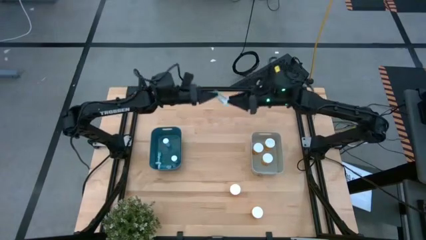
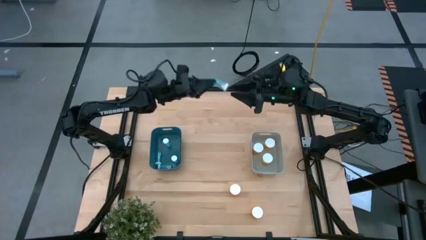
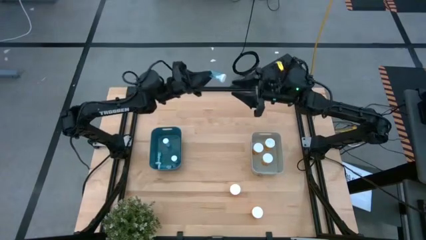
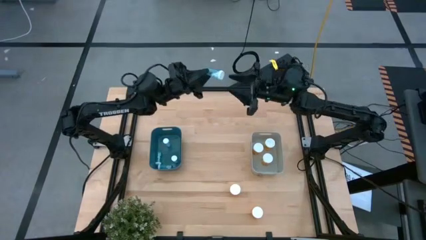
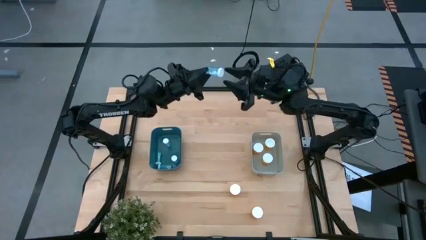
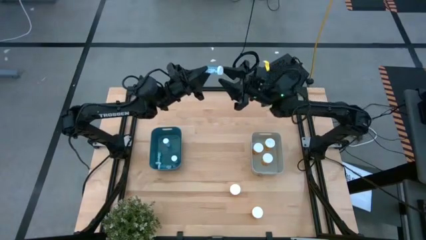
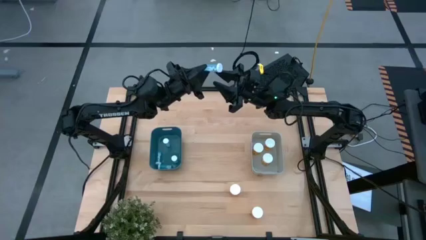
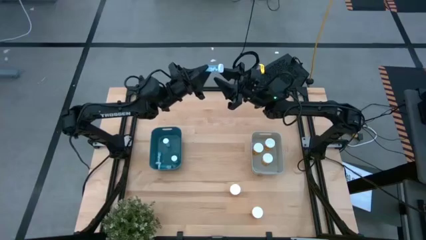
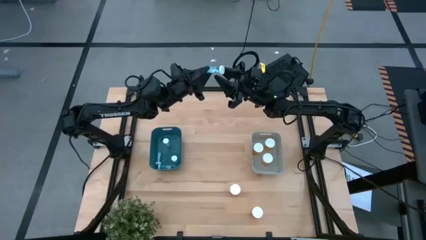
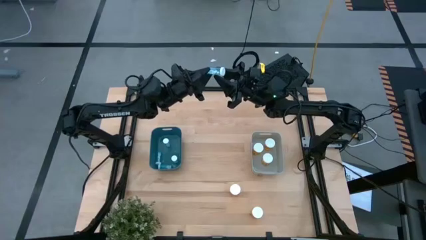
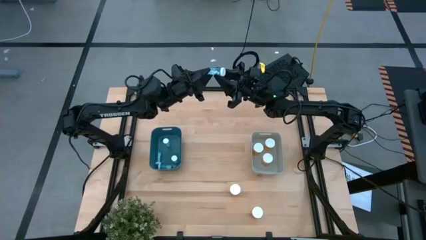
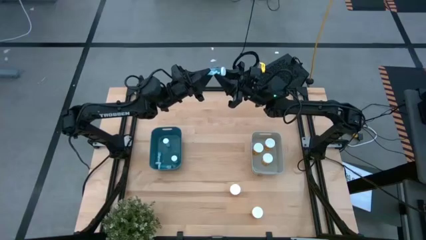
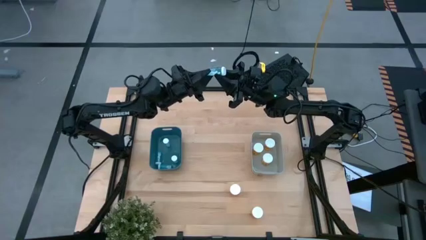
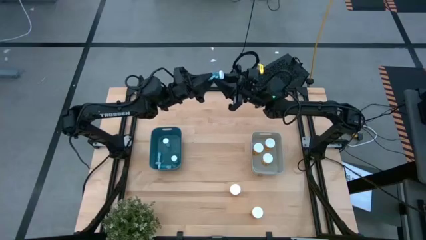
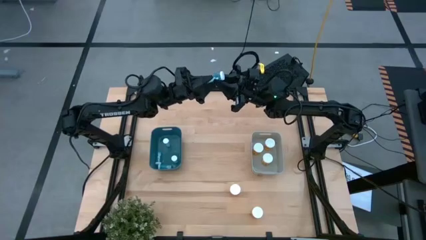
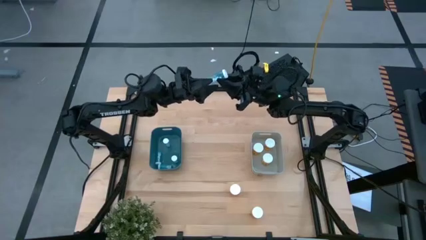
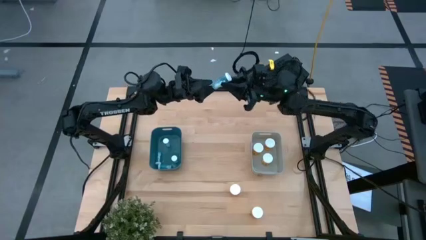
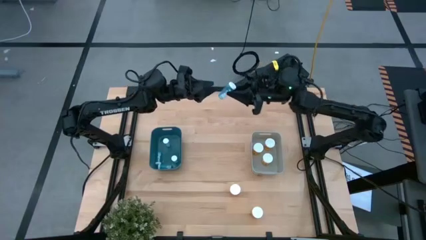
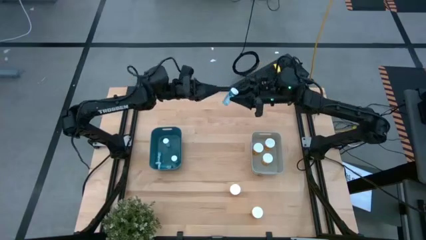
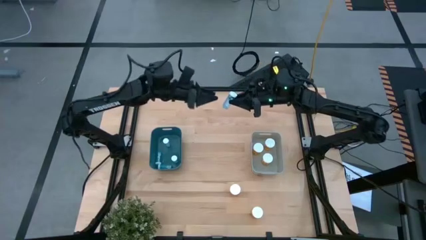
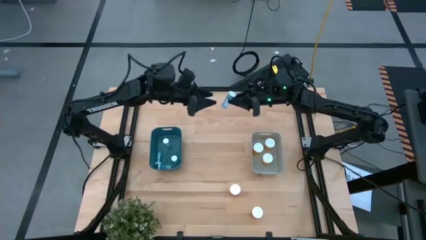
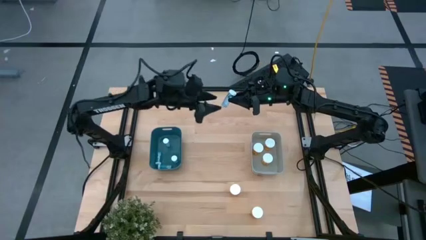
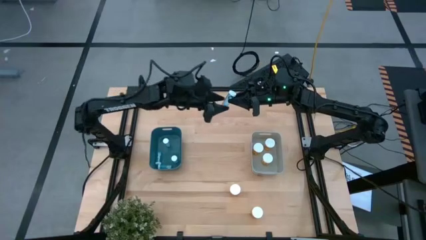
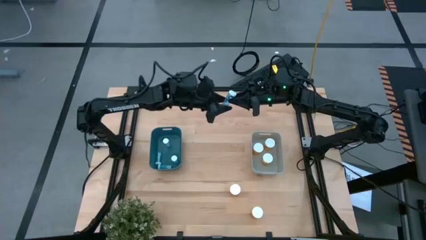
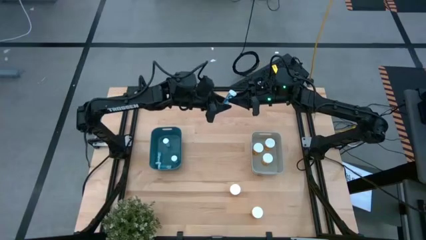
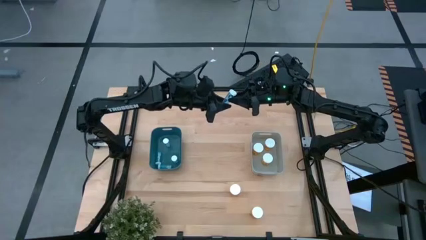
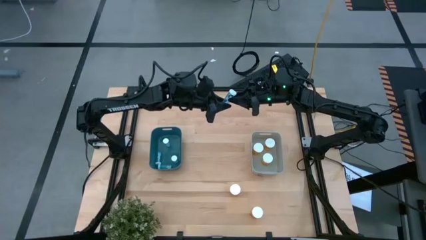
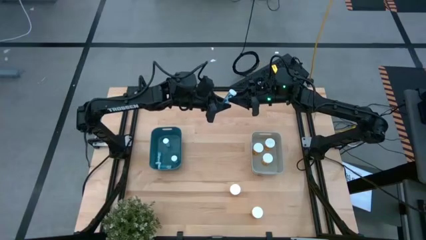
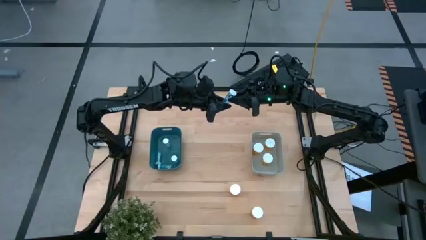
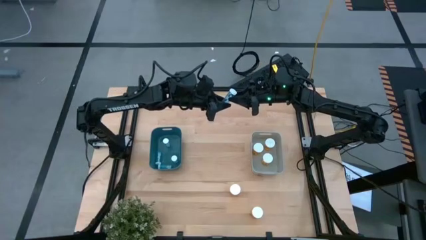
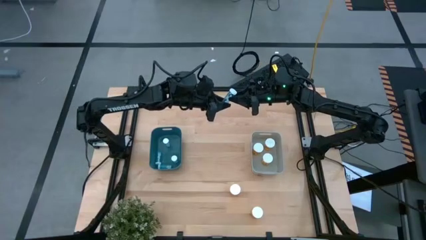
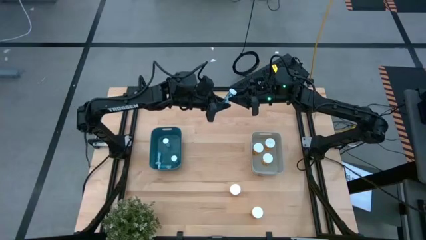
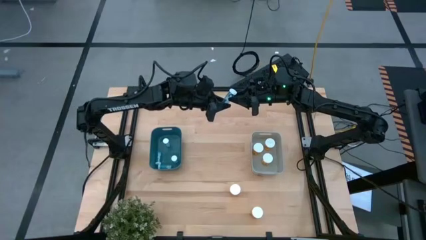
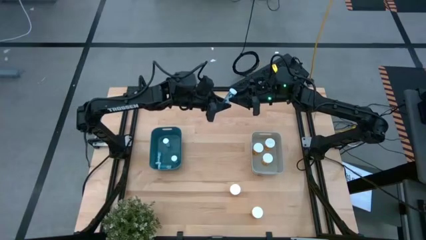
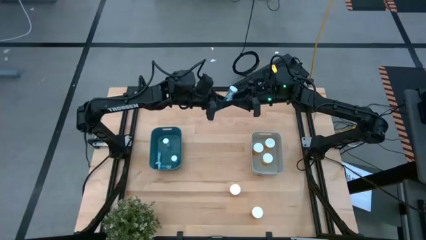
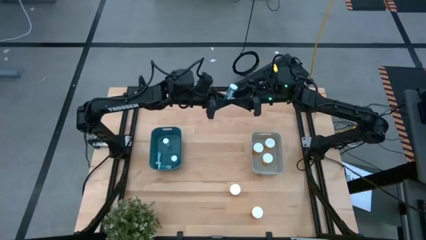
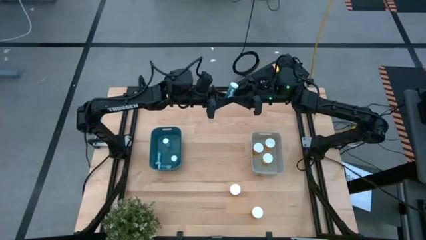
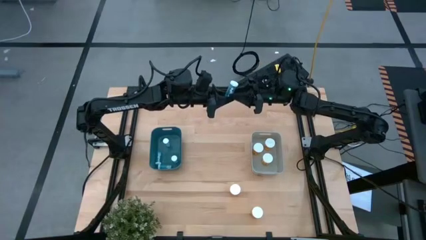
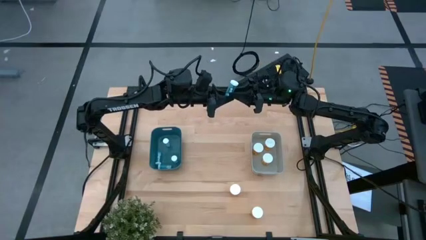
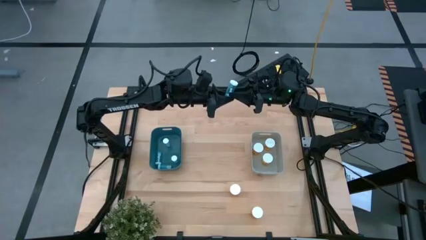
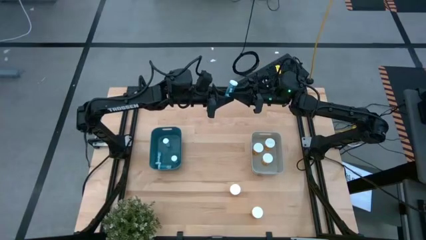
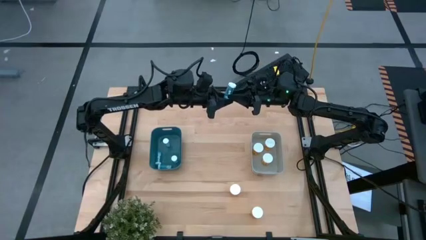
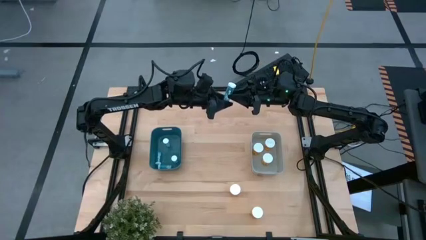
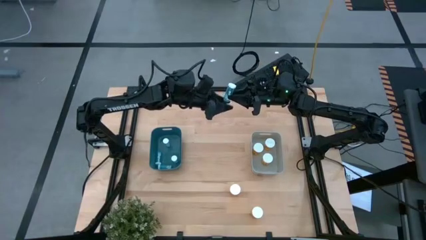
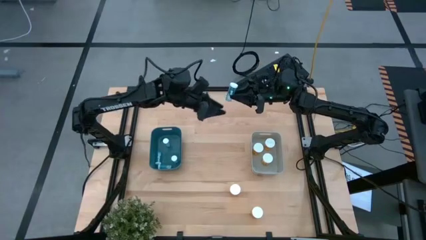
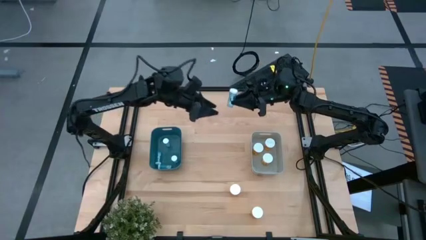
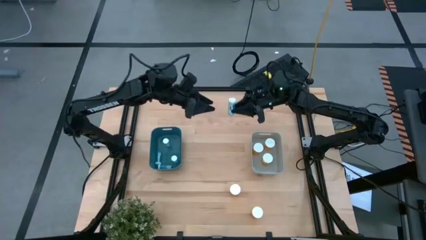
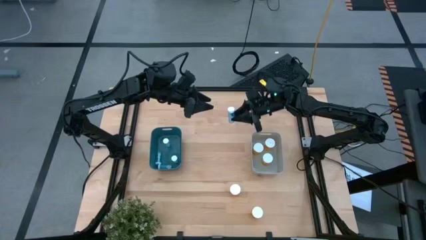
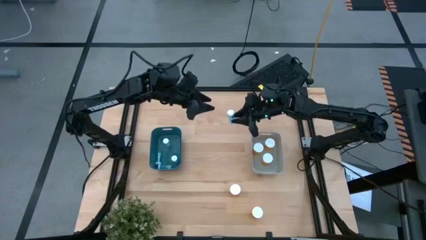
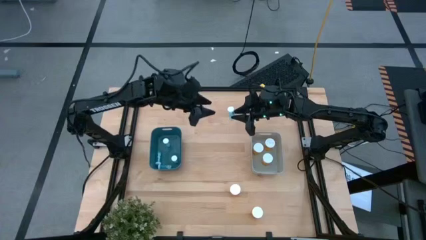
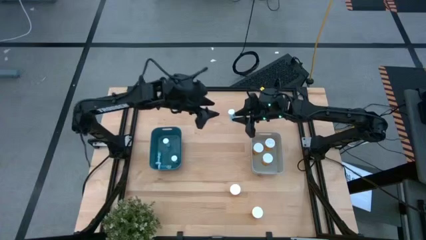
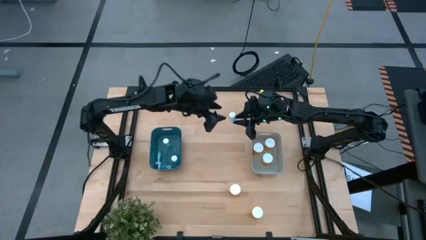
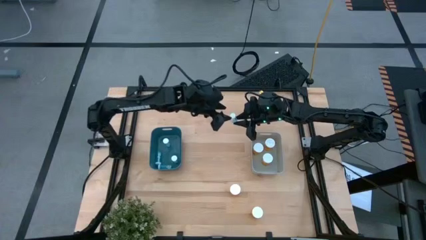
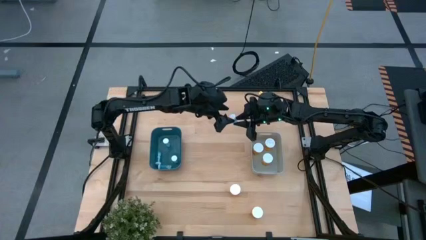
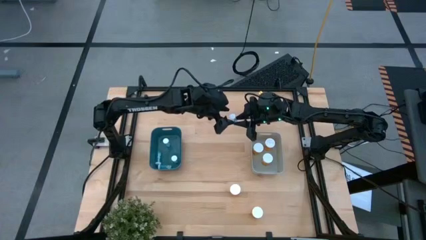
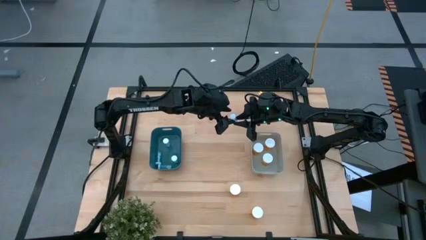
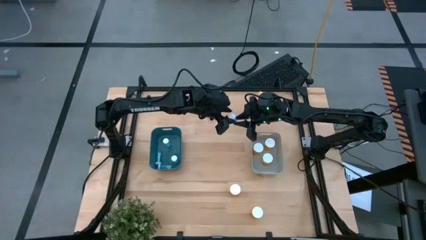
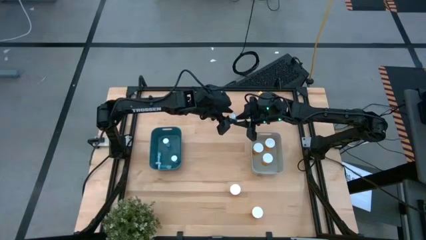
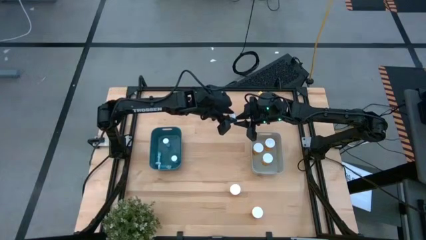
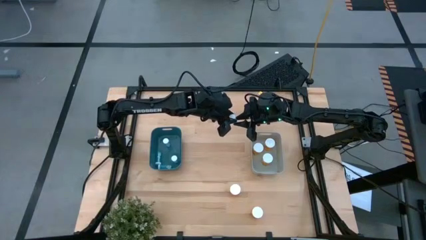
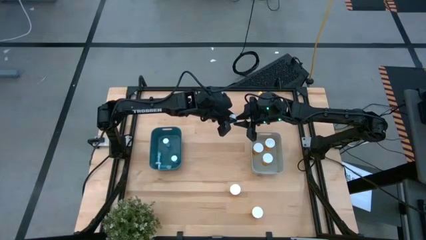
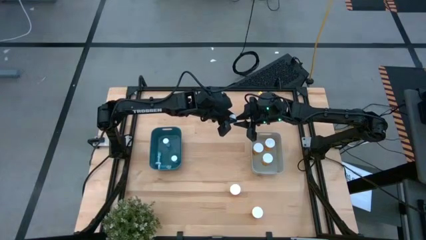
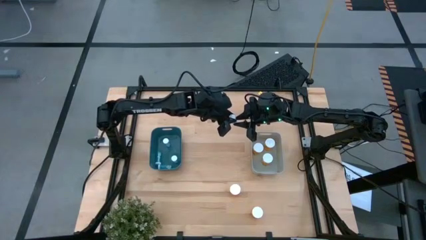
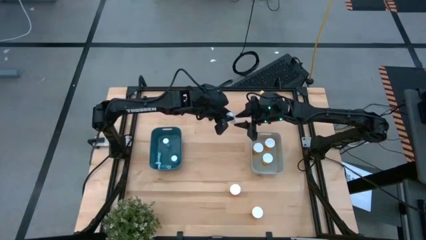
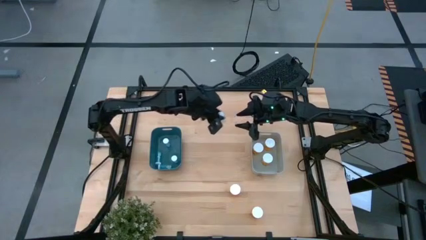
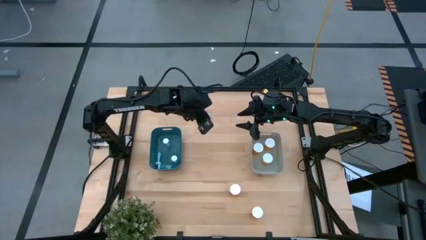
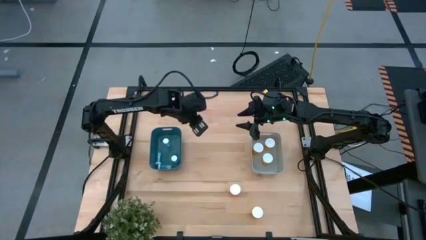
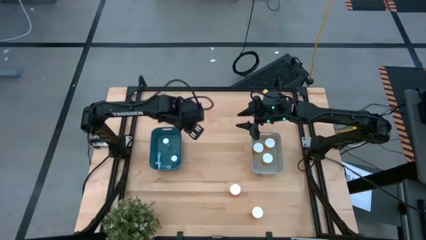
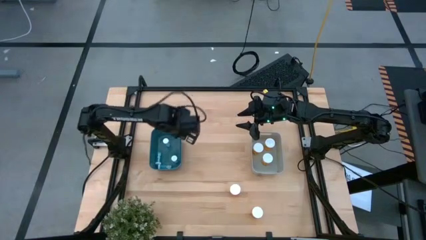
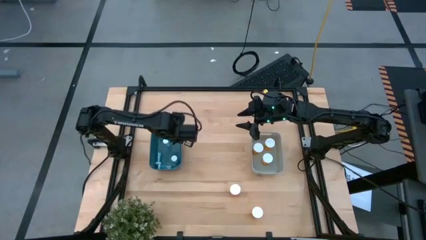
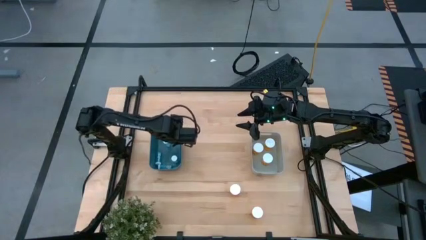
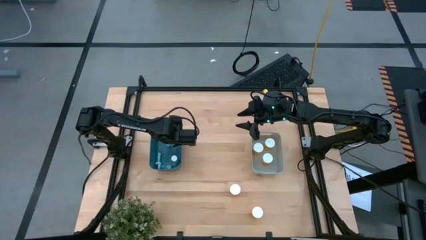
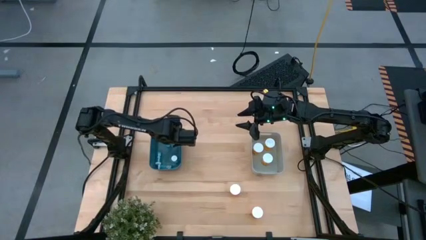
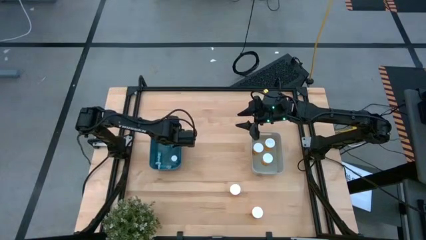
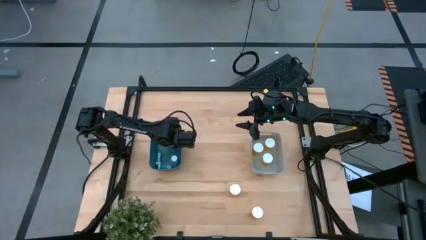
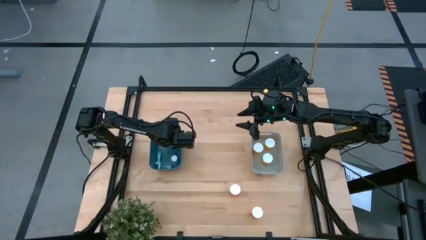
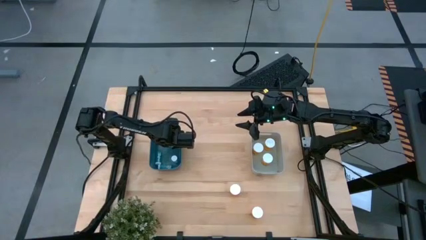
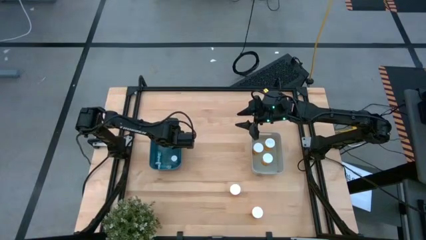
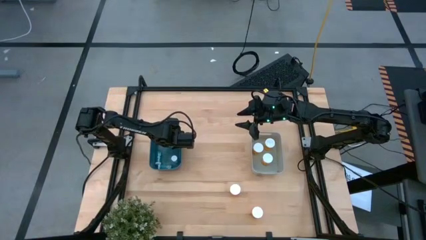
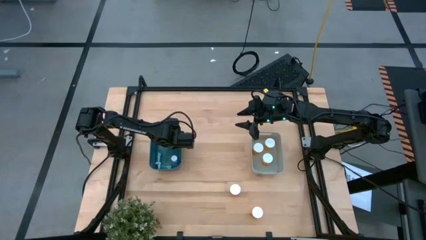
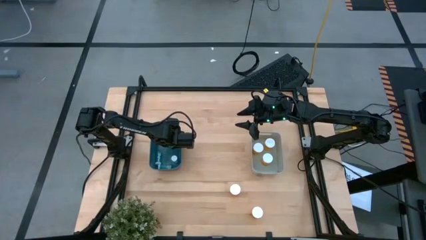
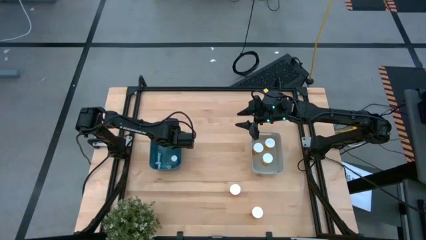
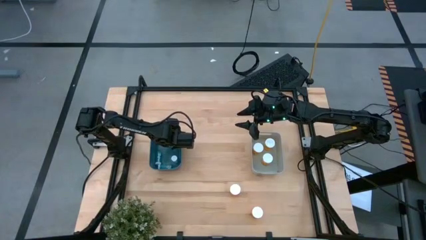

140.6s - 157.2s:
Task: Pick and place medicine bottles into bin by pill shape (circle, oval)
Adjust the blue pill bottle
